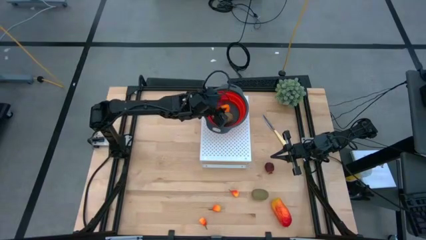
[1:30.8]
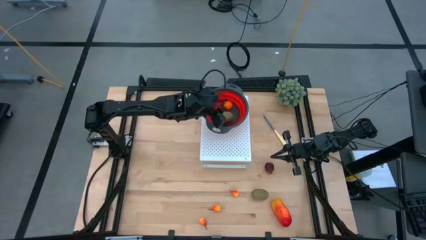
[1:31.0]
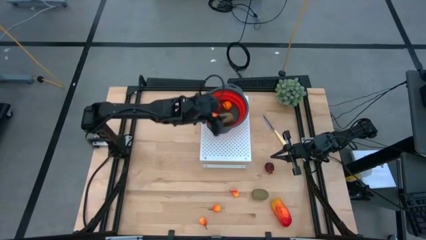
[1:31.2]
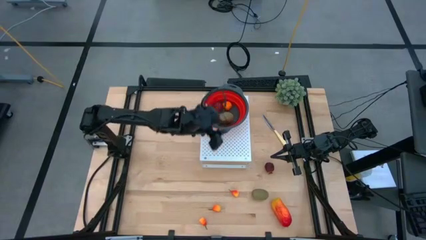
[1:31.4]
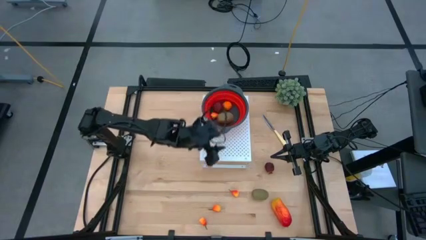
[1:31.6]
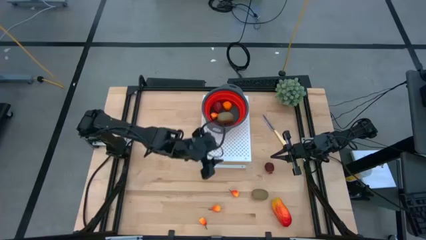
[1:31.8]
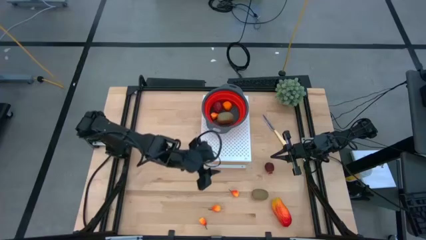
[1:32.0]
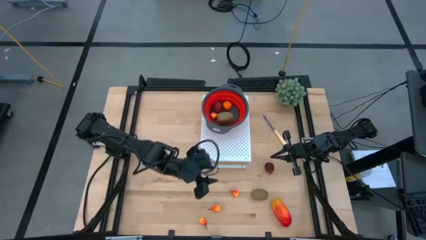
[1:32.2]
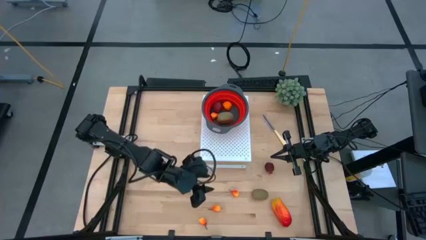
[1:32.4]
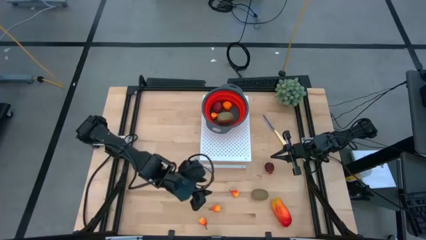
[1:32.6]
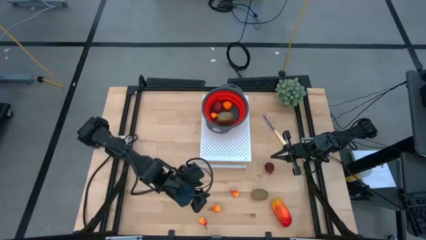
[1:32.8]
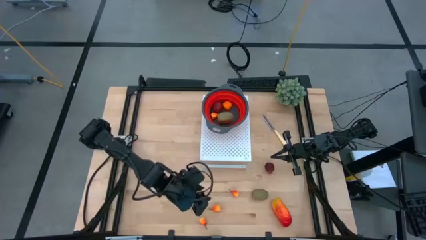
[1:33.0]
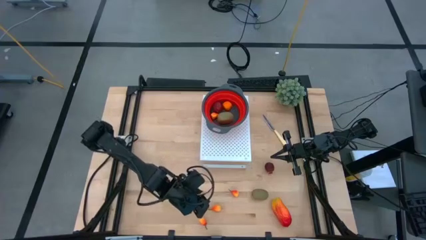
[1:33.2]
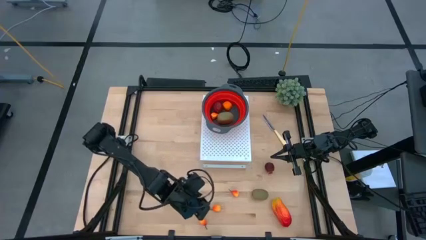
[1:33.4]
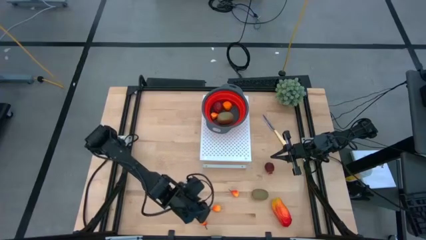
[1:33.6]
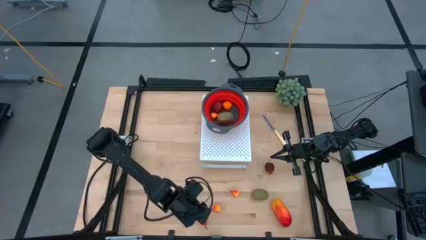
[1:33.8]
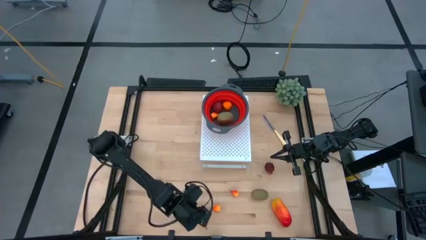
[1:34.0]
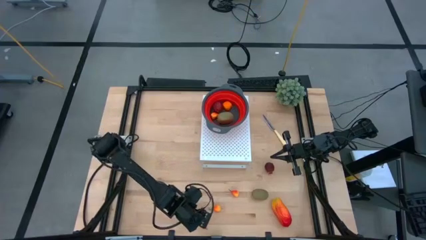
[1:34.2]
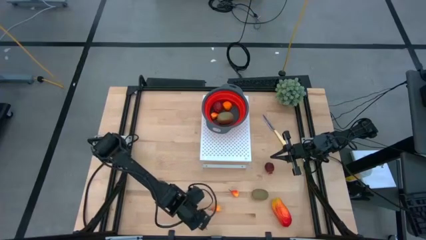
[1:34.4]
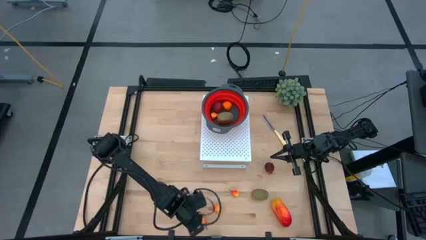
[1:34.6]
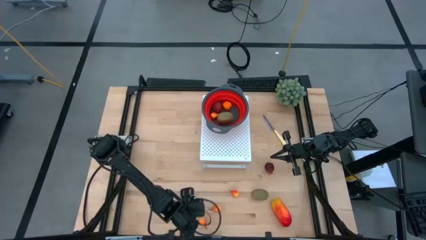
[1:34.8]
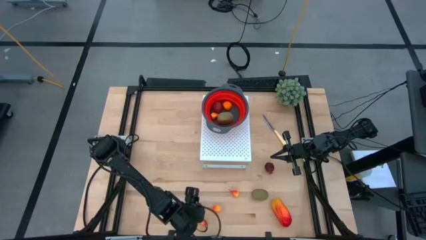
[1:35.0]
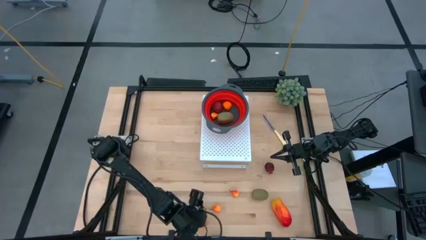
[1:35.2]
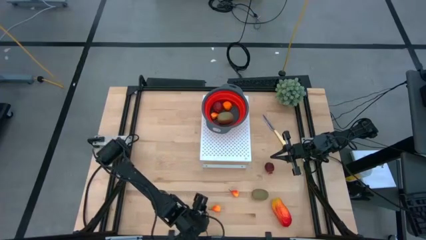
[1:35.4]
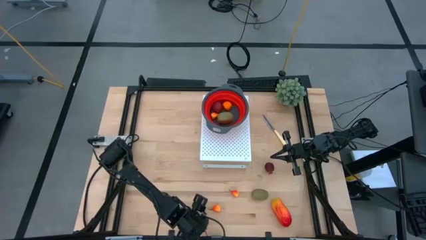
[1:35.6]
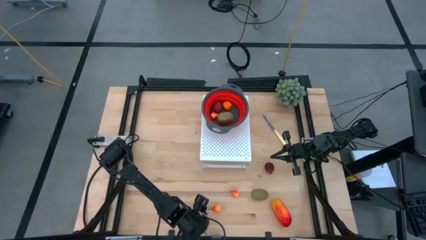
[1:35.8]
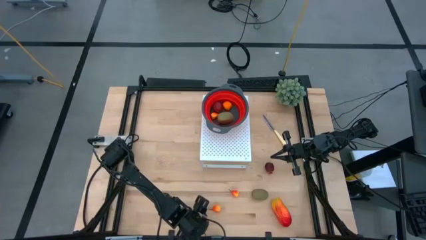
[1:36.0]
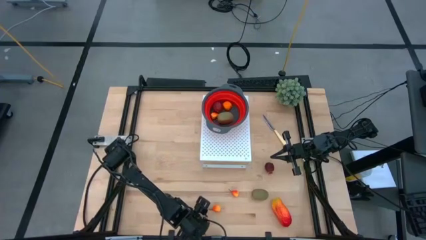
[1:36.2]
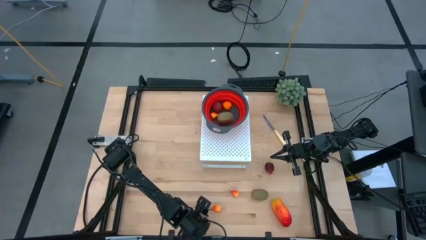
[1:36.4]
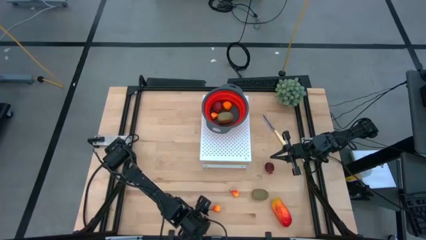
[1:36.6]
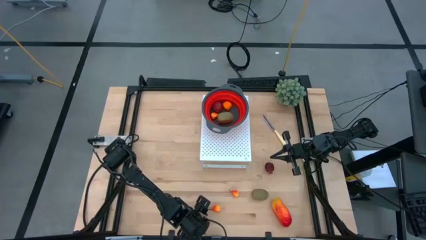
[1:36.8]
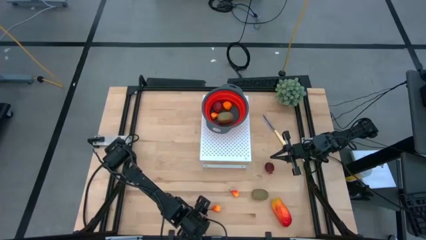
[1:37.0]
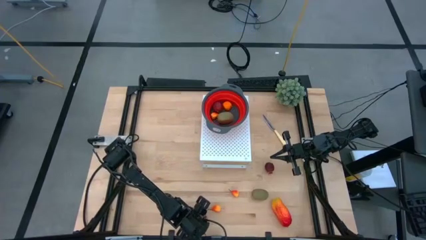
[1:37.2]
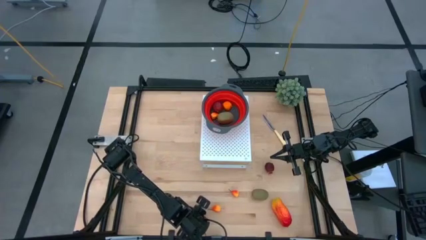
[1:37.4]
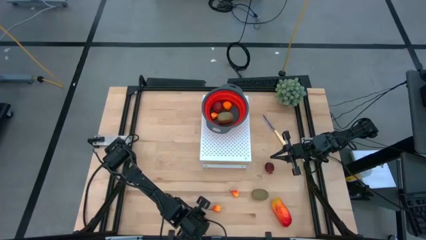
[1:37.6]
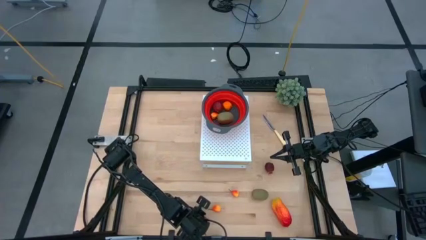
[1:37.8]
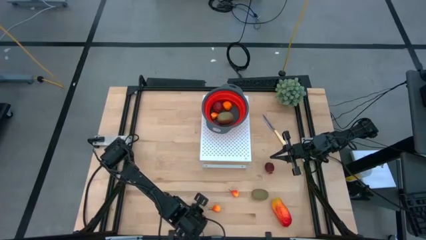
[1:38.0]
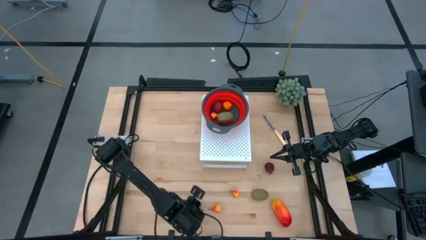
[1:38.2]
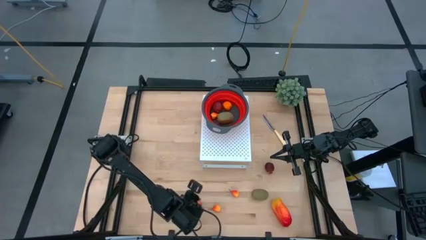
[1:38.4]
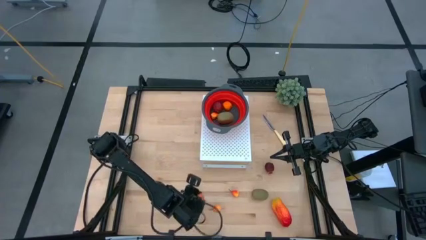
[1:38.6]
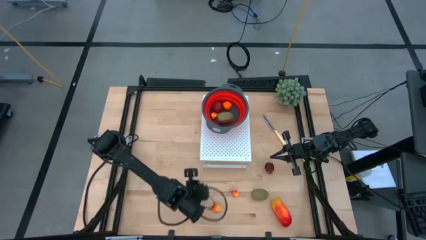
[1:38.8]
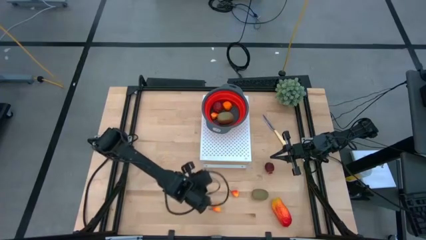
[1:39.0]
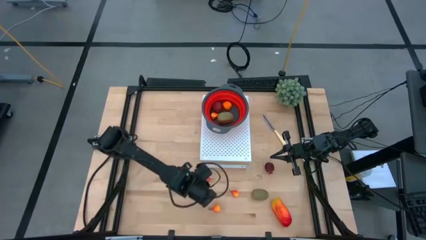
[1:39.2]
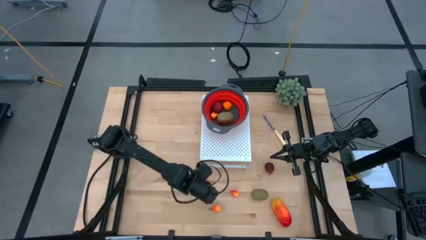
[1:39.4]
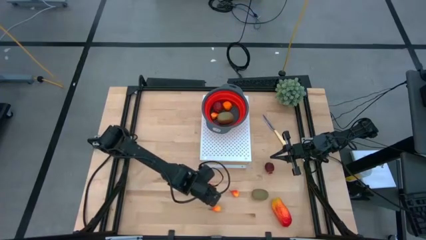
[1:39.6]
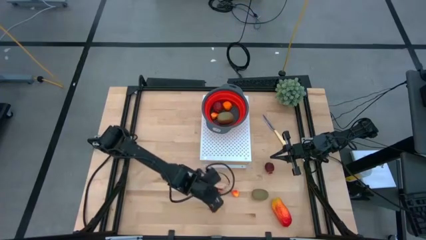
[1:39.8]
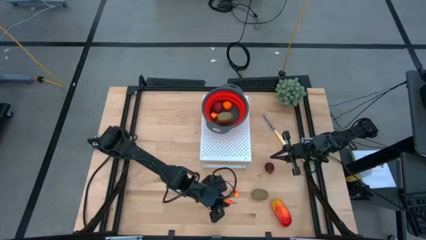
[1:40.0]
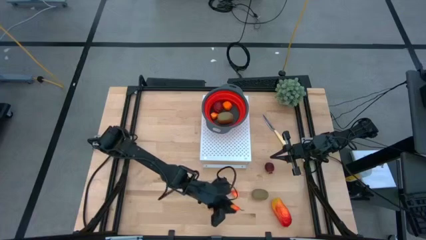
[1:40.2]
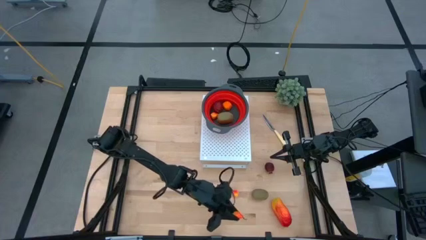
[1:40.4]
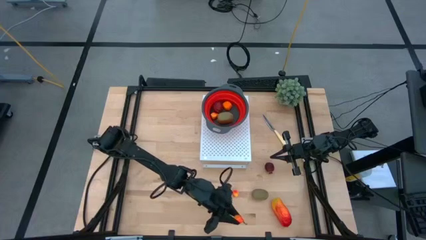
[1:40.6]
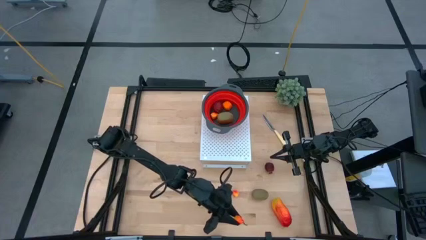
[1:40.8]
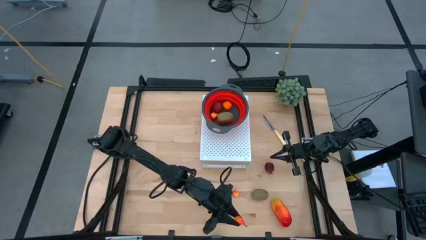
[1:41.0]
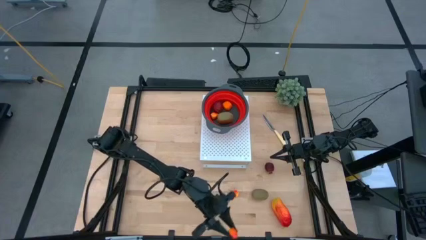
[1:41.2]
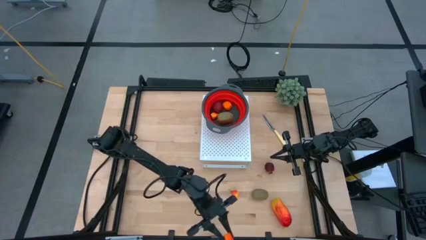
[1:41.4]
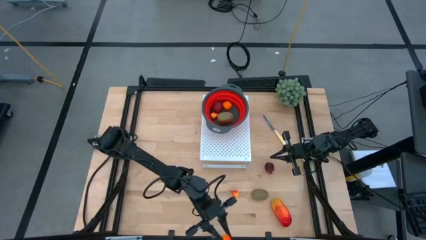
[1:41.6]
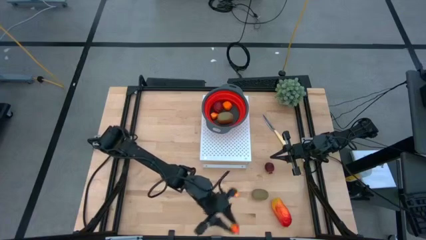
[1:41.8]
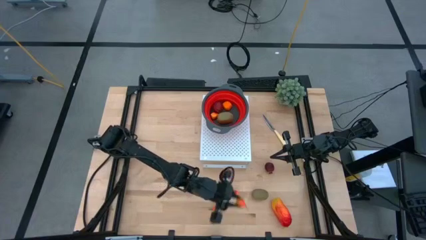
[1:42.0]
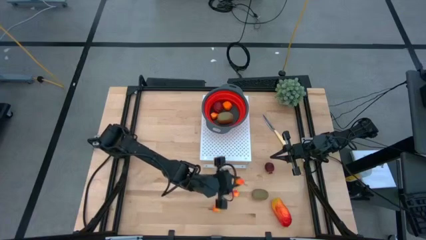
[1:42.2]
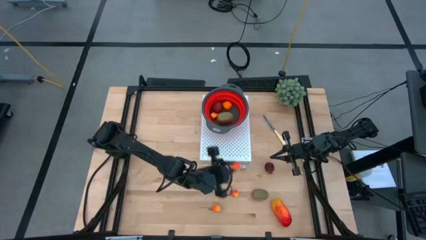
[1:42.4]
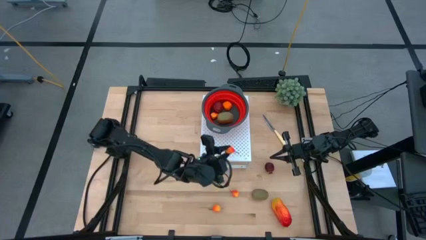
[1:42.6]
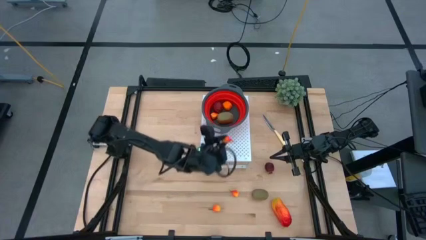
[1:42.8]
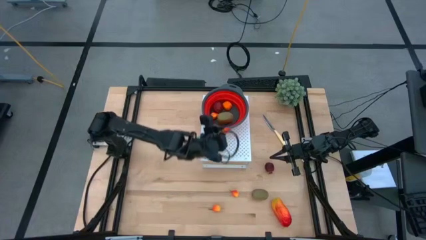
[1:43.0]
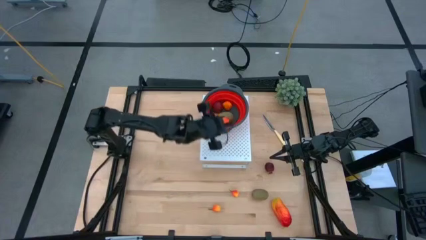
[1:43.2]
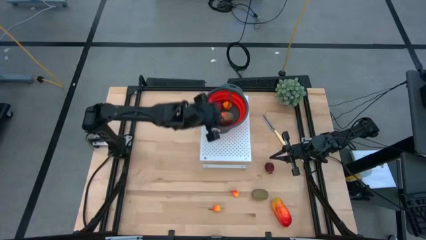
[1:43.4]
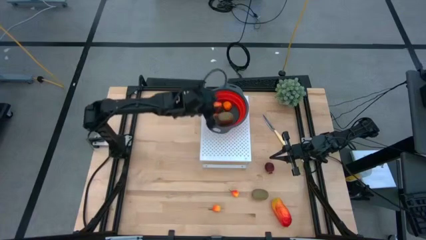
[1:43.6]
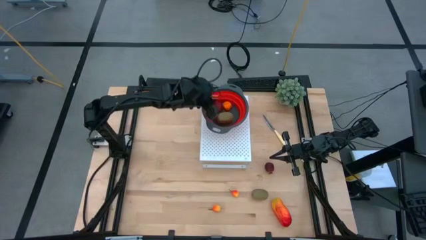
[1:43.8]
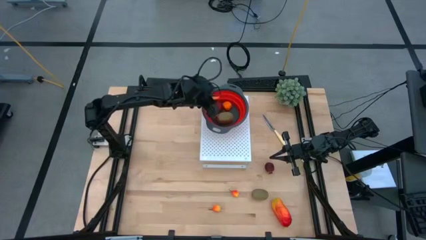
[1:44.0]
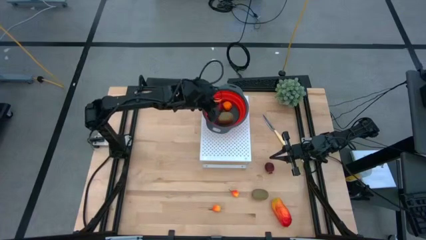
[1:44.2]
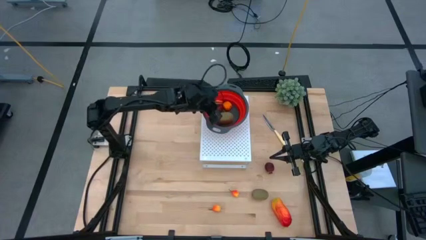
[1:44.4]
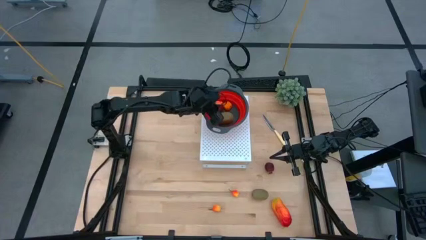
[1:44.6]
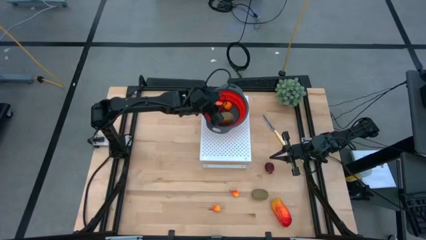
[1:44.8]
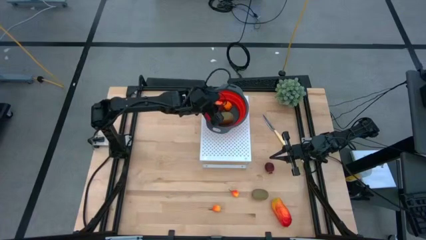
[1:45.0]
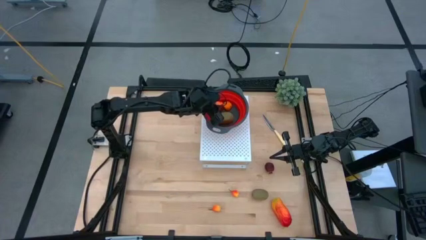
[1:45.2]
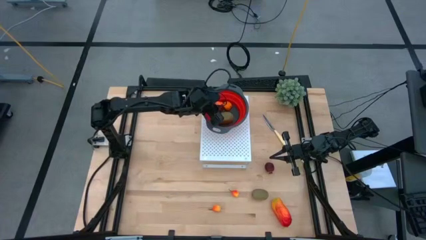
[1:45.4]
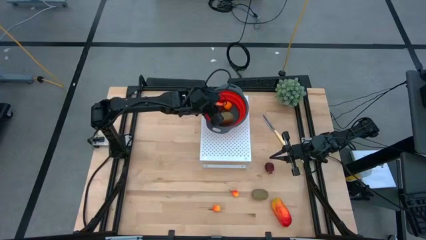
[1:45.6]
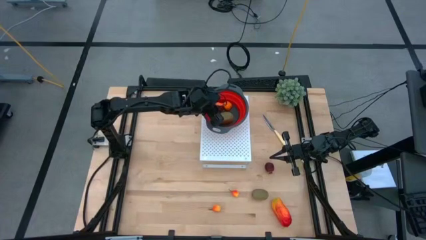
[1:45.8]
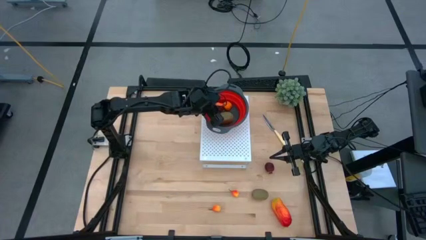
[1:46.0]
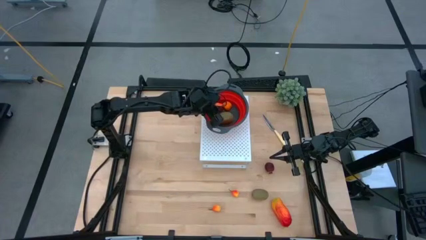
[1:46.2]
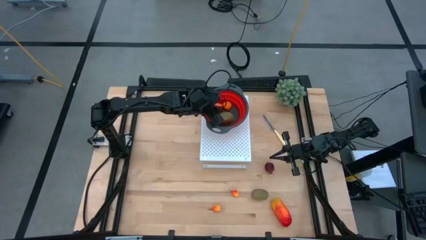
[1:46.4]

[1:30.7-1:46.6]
Task: Pick & Place Fruit
Put the orange pear into the red strainer bowl
